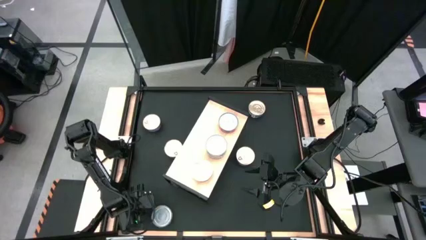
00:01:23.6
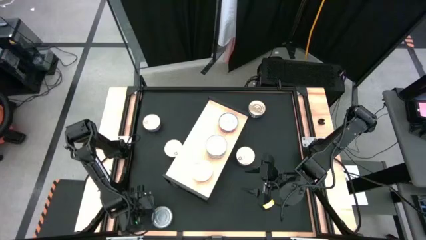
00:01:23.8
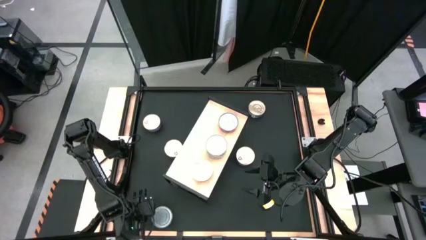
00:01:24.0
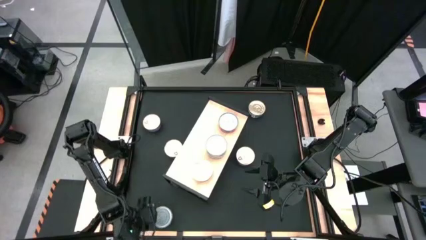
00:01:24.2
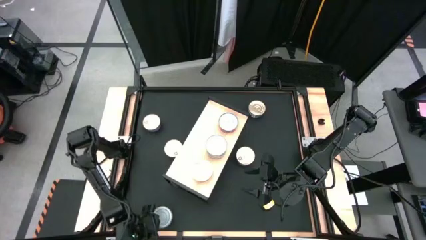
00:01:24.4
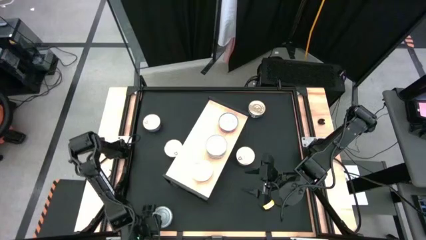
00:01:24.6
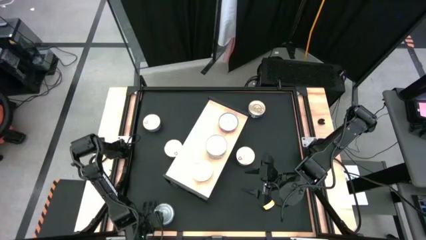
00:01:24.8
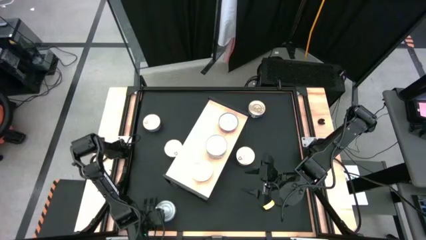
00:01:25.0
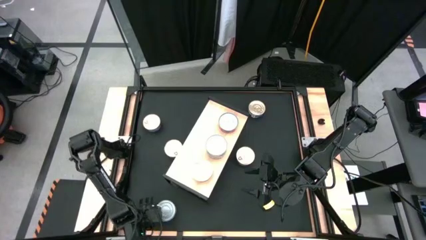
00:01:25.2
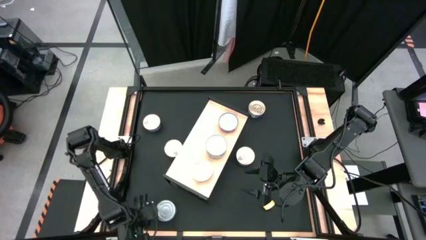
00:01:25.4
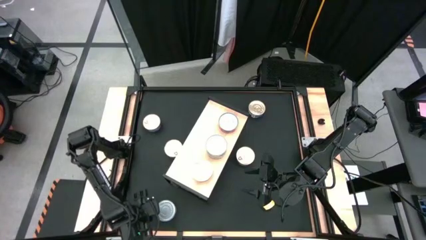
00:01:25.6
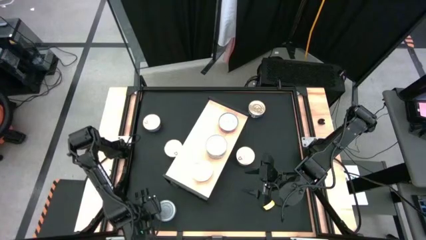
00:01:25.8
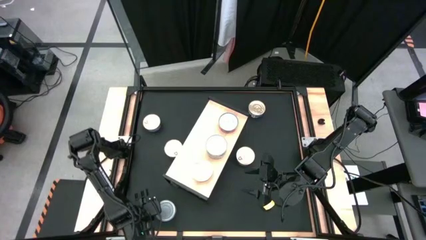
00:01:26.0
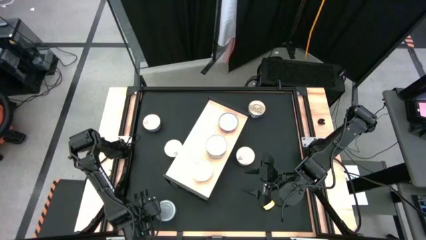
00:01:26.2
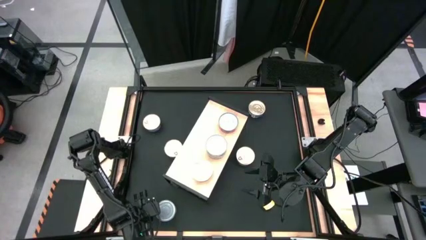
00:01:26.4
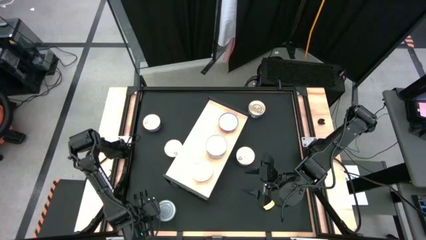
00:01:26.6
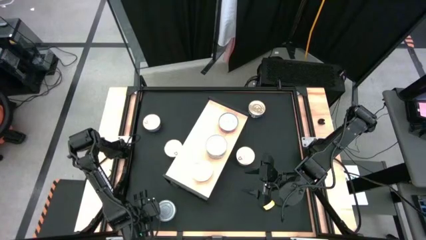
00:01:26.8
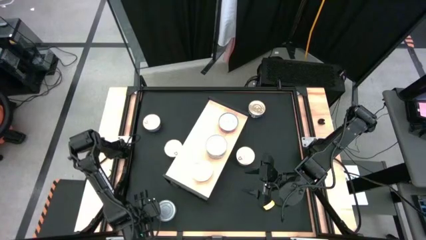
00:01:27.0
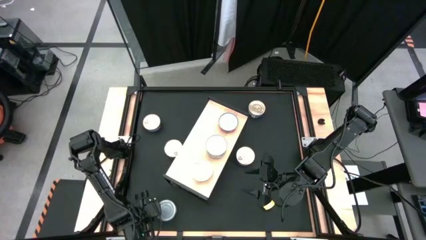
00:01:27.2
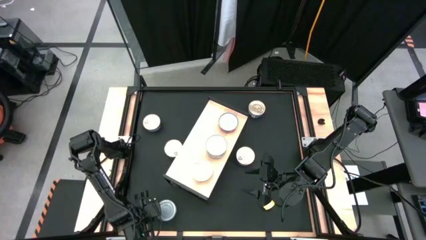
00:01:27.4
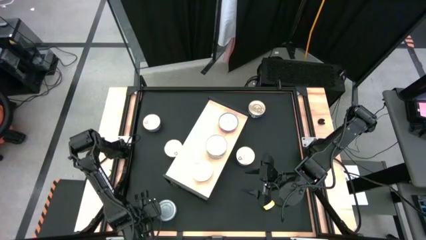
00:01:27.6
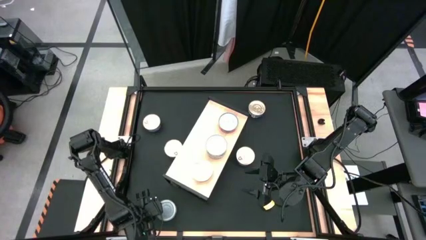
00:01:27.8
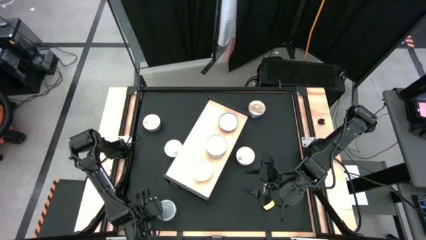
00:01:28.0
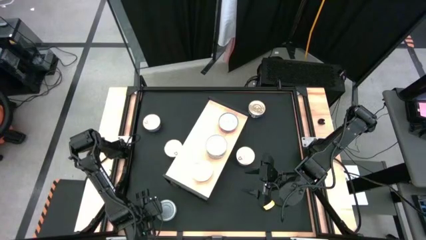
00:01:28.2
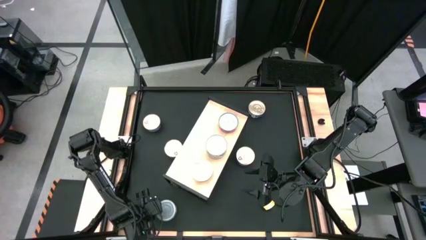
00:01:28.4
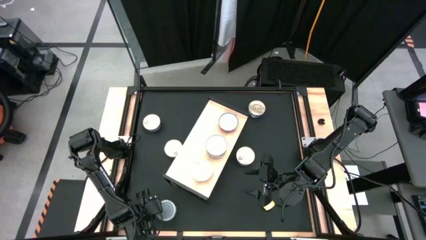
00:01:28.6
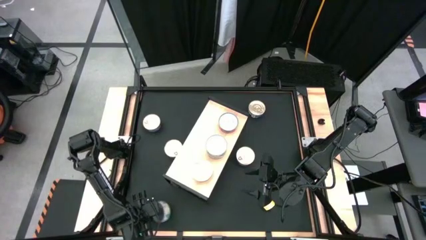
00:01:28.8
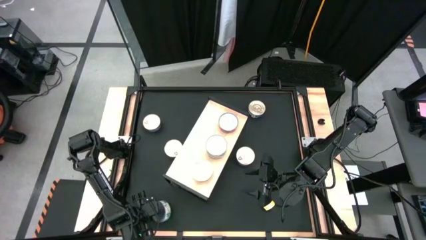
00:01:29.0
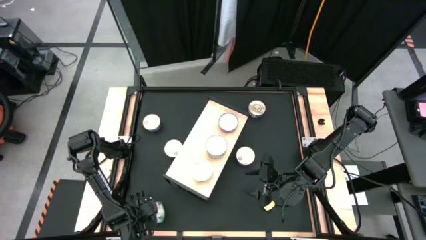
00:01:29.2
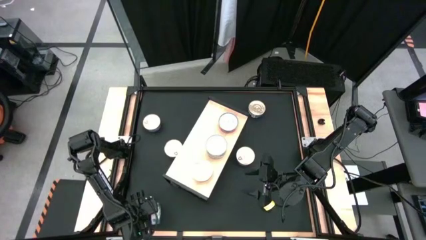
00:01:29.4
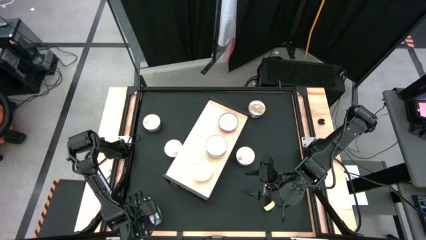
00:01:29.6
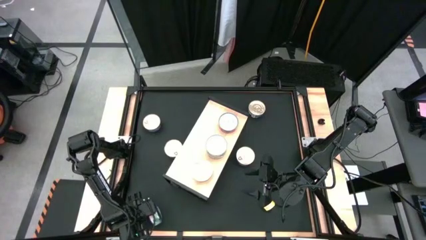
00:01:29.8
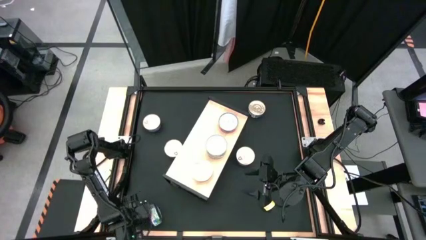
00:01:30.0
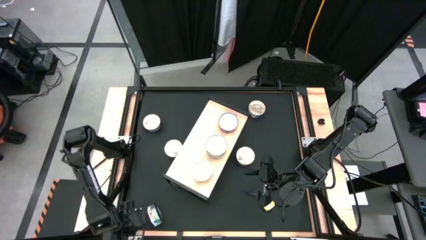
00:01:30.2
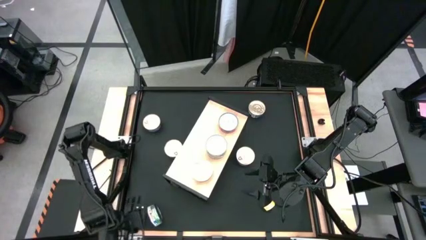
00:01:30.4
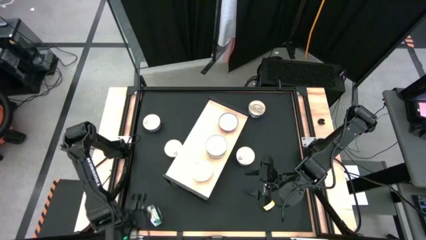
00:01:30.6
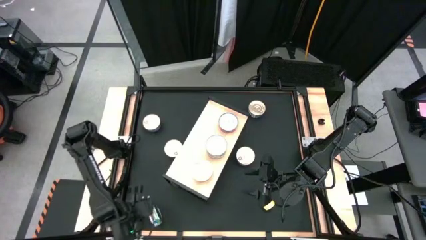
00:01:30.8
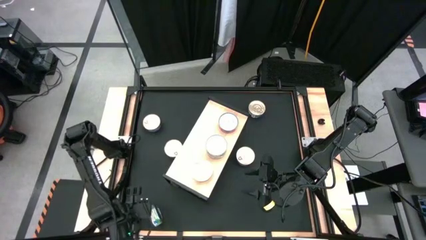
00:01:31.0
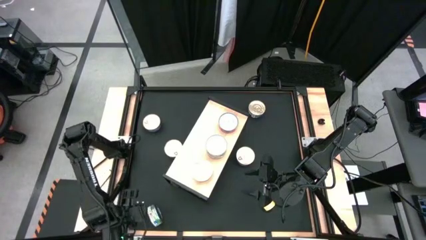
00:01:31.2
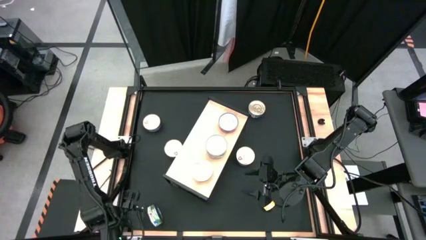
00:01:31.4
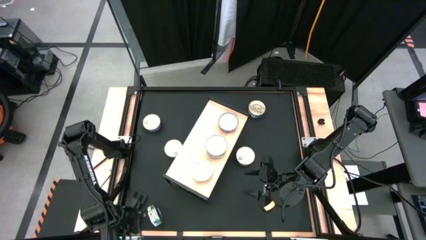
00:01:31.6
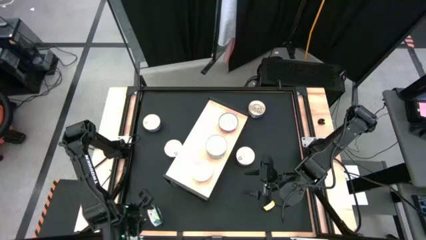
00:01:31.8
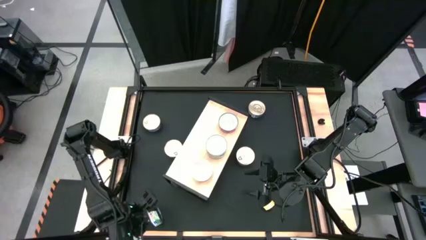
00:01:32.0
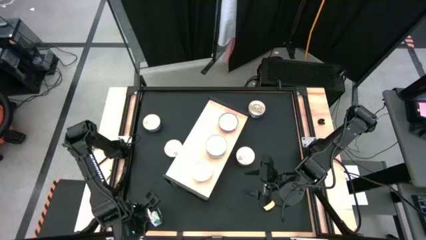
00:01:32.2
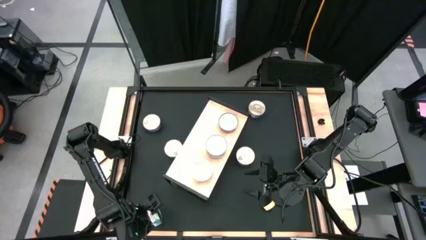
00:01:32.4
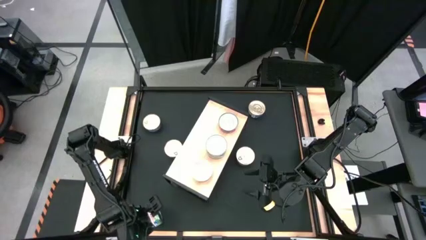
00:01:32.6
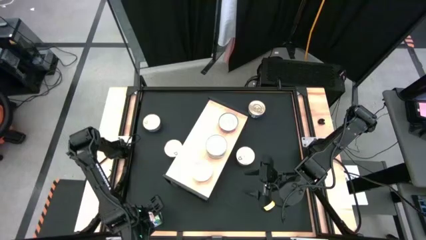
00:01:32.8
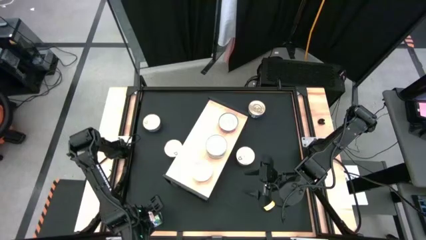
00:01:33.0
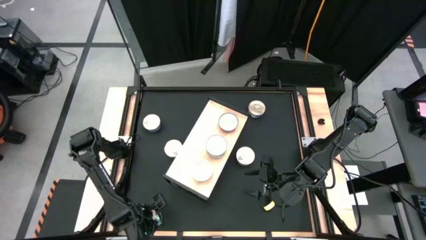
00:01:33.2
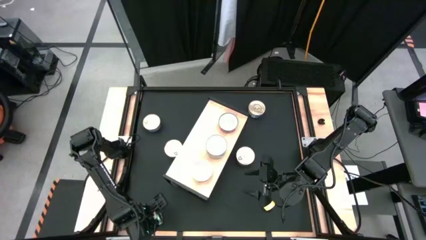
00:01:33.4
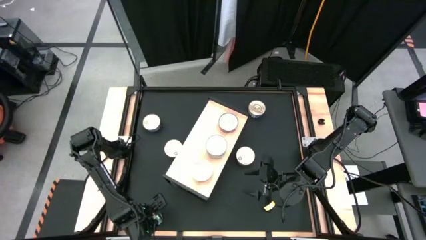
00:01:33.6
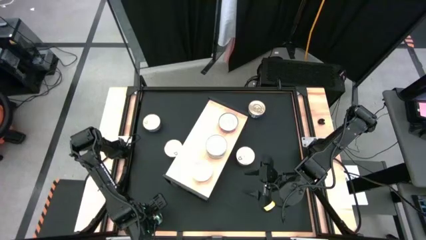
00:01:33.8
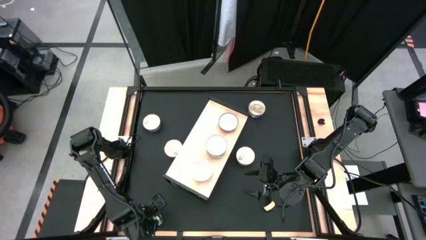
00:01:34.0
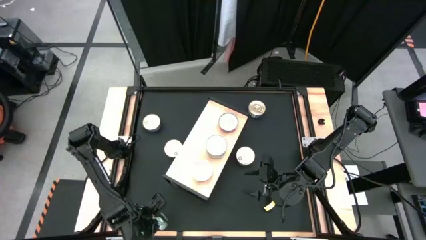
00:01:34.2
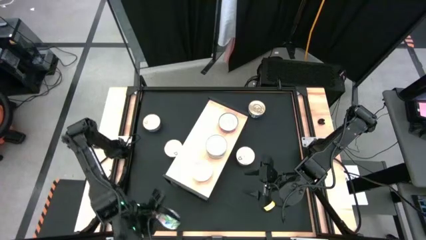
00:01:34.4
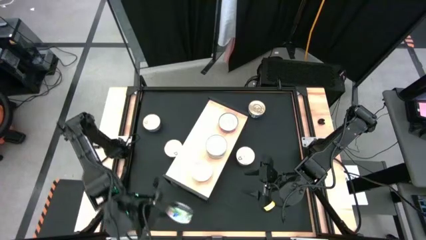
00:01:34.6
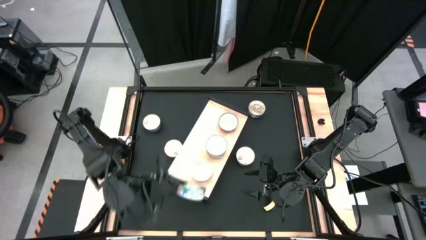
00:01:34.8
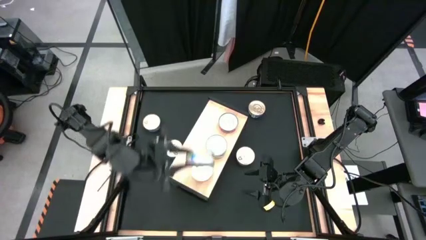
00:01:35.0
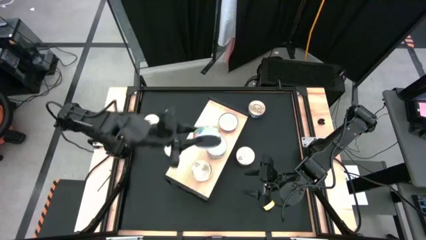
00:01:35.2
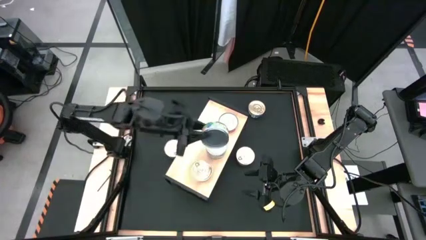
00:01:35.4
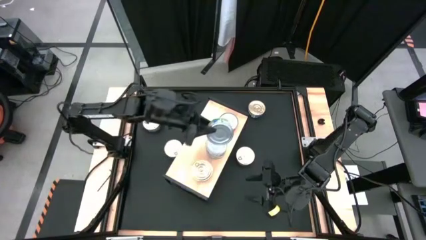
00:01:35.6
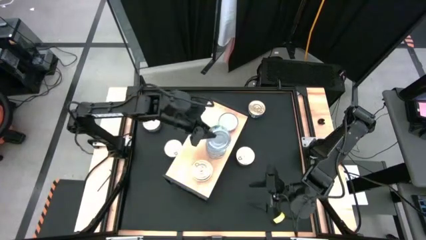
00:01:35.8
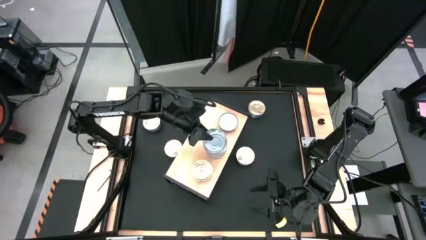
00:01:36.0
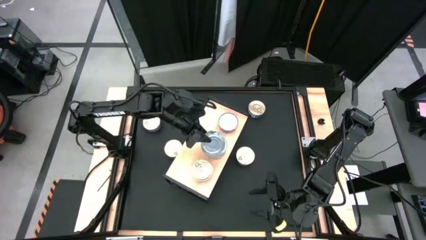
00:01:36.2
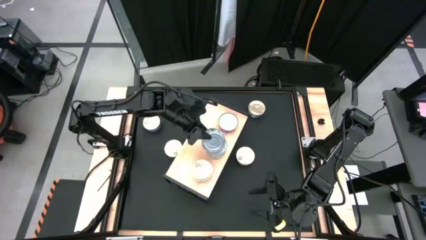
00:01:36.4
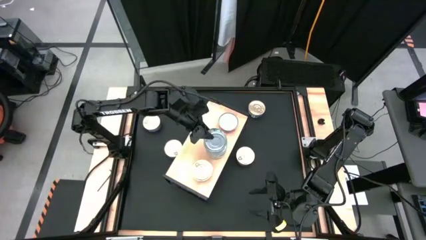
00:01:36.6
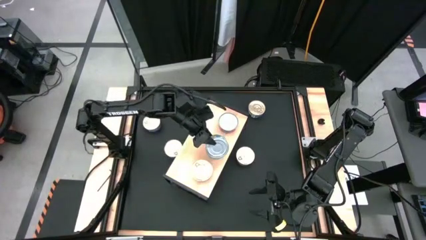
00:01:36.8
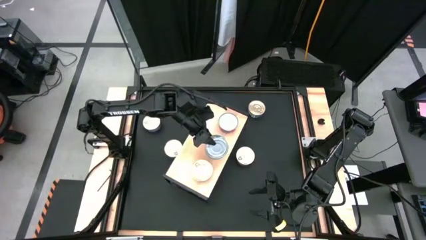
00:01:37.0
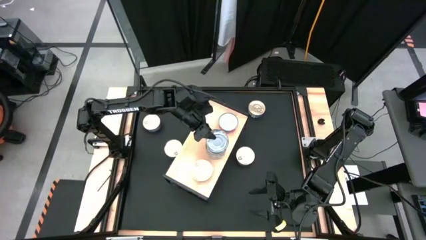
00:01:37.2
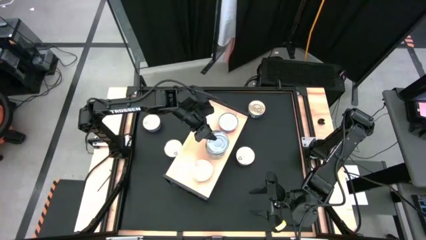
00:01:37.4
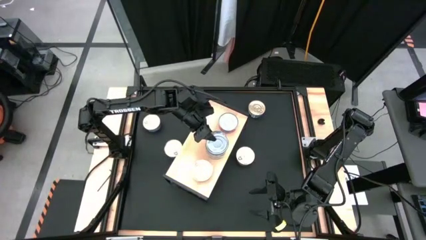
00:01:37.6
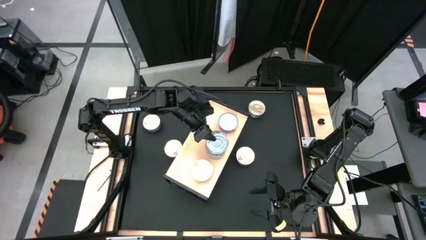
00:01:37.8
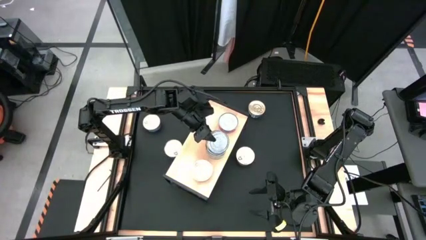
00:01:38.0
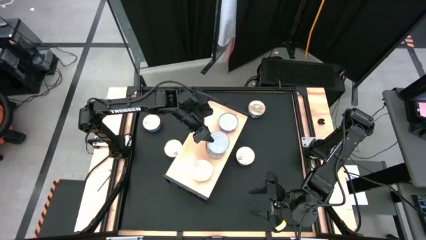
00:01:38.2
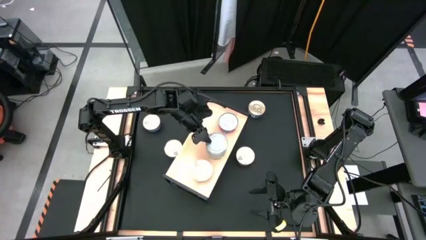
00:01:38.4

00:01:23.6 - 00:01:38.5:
Task: Stack canned seafood by type on shelf
Stack the green tuna can on top of the other green tuna cans on the shelf
